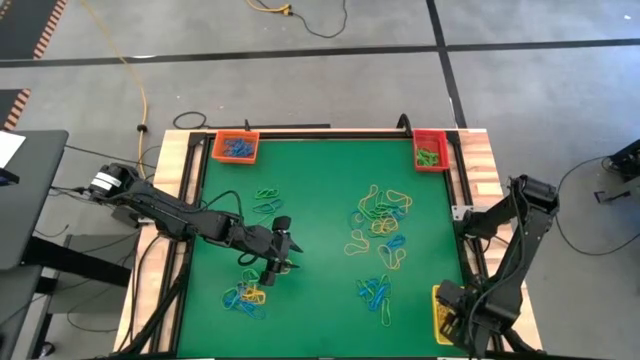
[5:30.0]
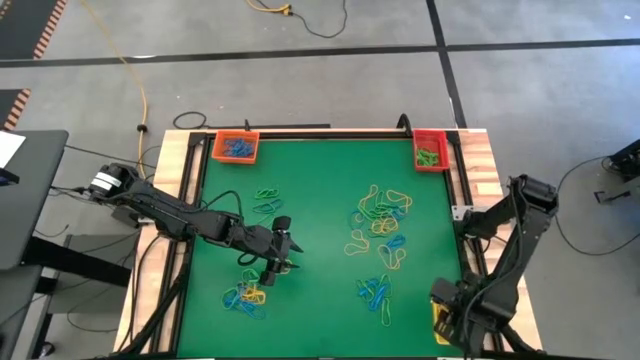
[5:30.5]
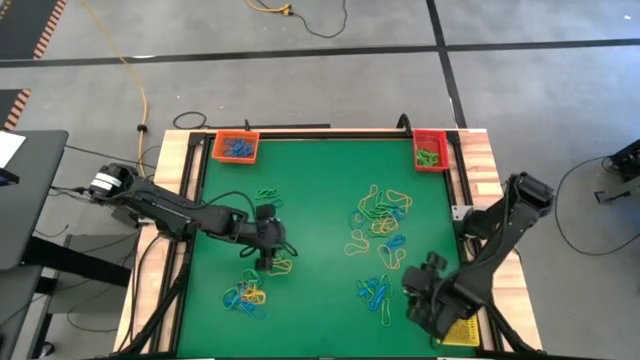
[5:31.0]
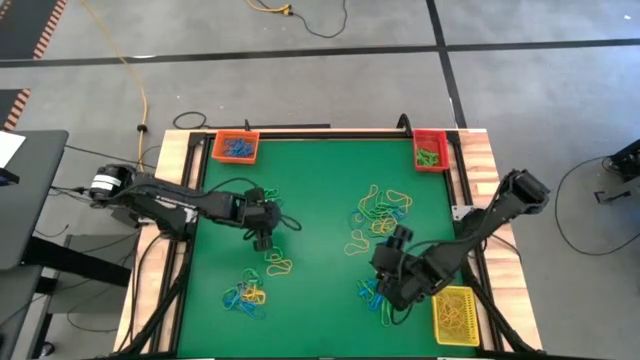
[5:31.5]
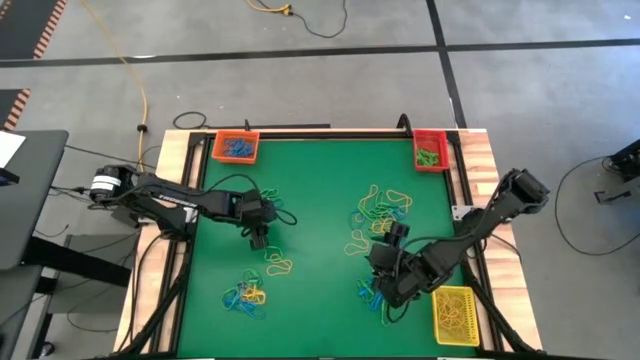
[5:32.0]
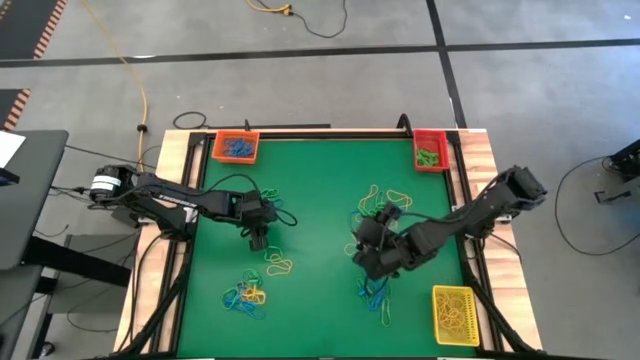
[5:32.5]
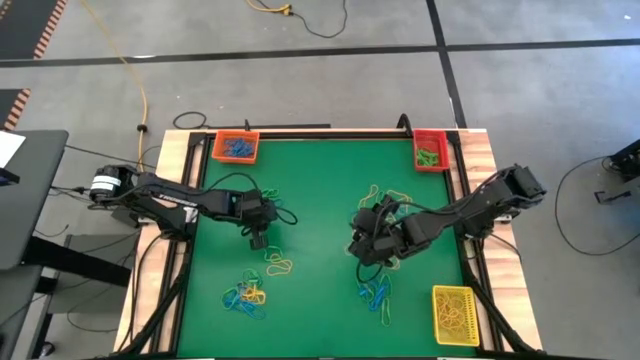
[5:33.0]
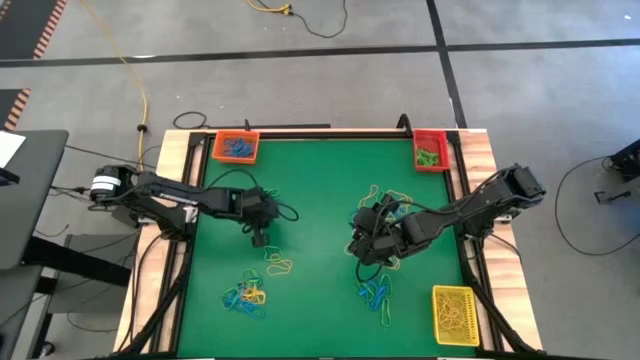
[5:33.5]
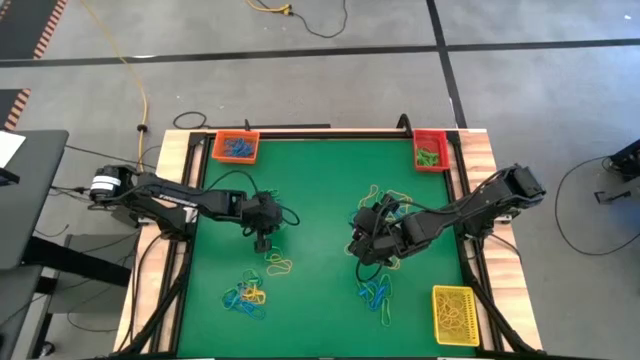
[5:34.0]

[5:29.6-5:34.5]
Task: Sort rubber bands into baskets
Put the top left green rubber band into the red bin

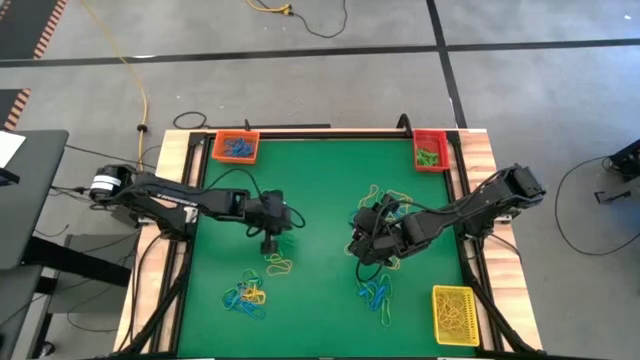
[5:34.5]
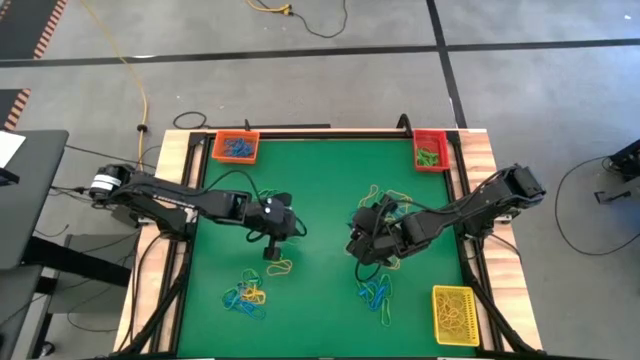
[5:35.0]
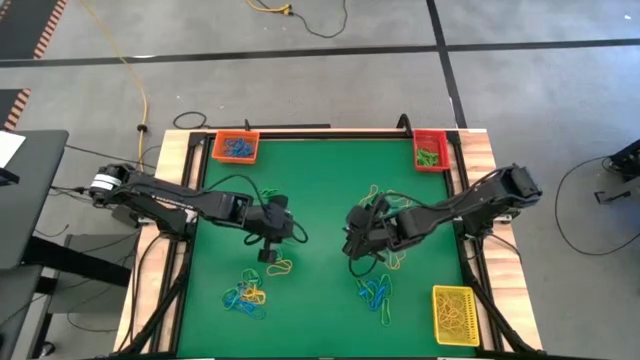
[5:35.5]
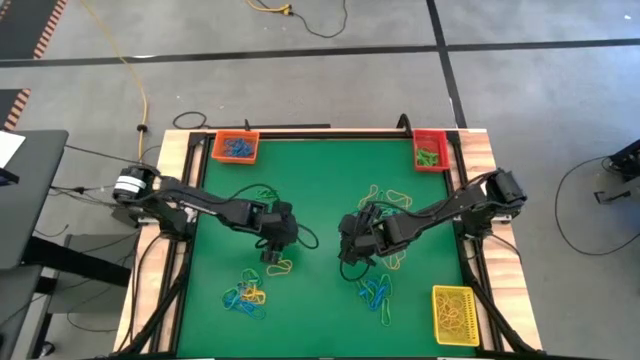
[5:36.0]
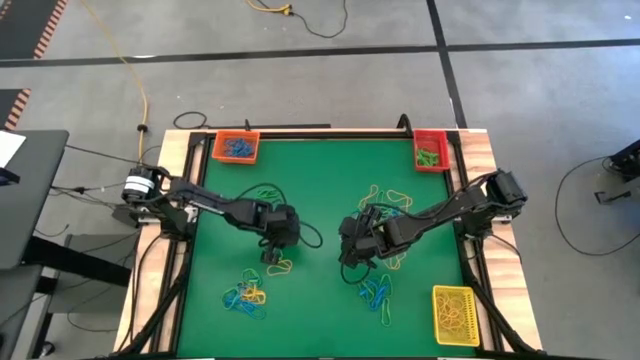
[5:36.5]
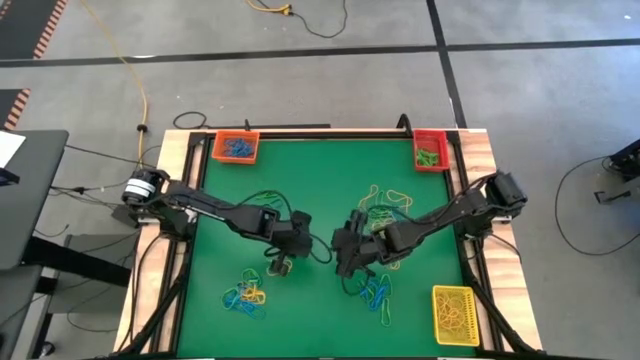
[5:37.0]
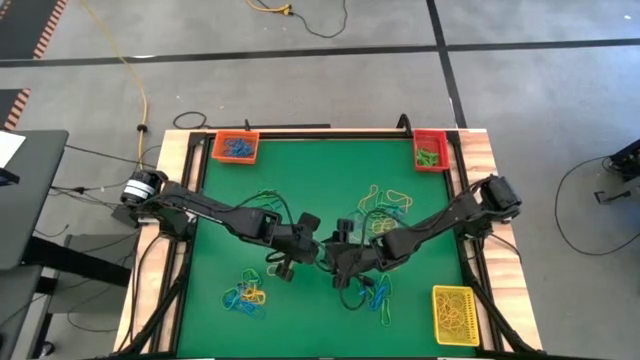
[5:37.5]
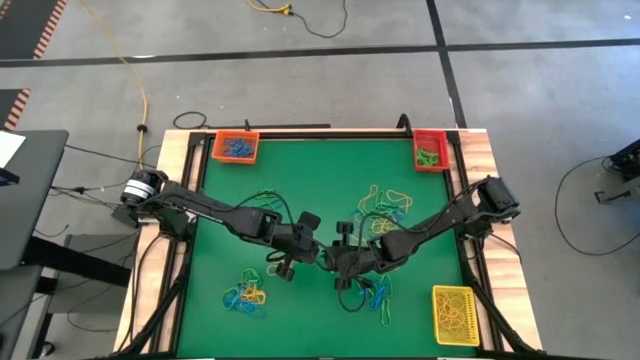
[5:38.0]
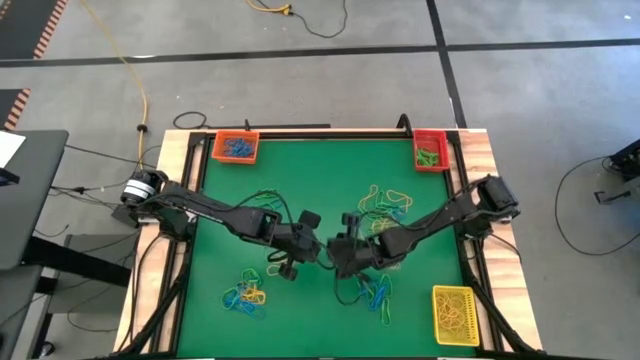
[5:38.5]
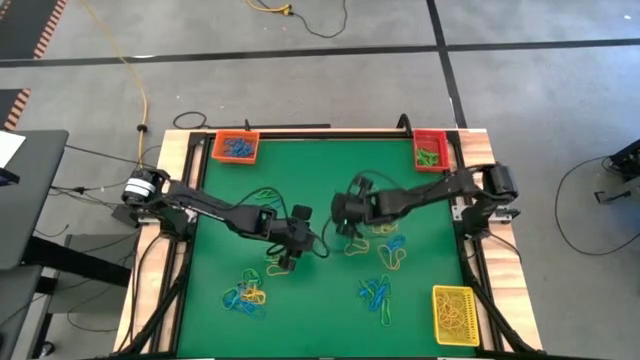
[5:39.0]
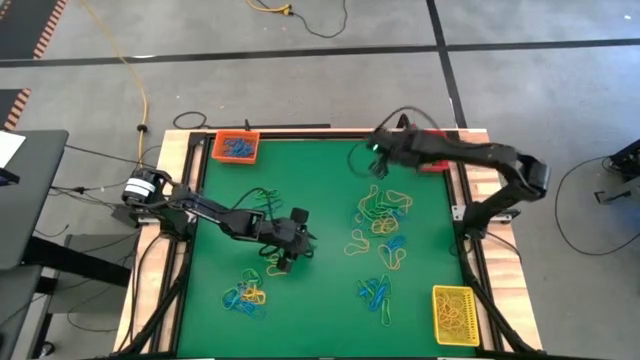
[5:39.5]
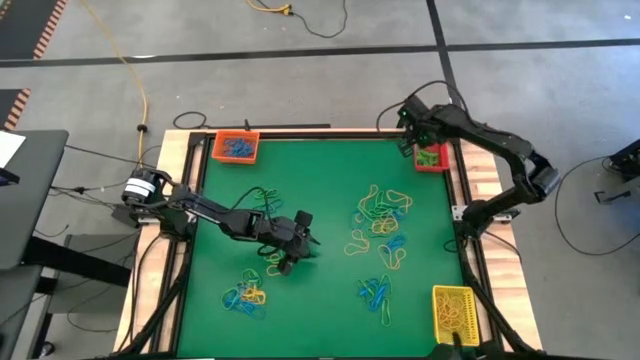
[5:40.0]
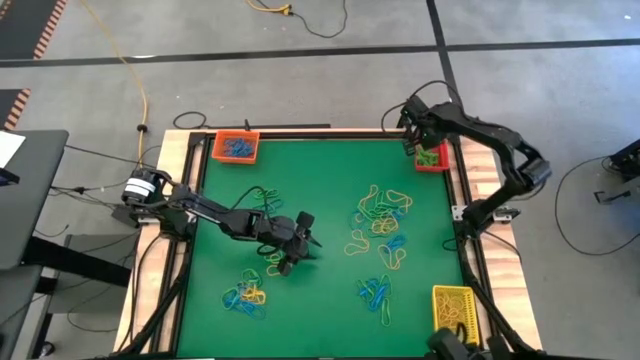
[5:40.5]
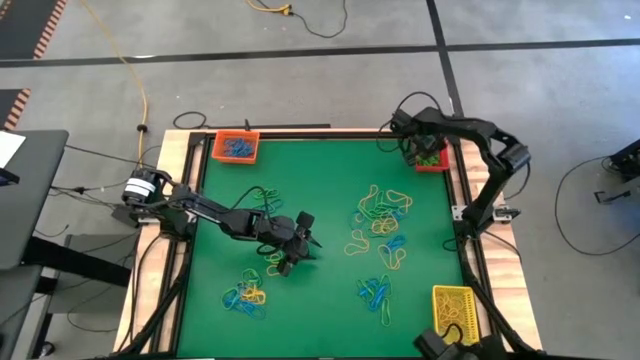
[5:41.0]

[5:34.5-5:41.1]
Put the top left green rubber band into the red bin

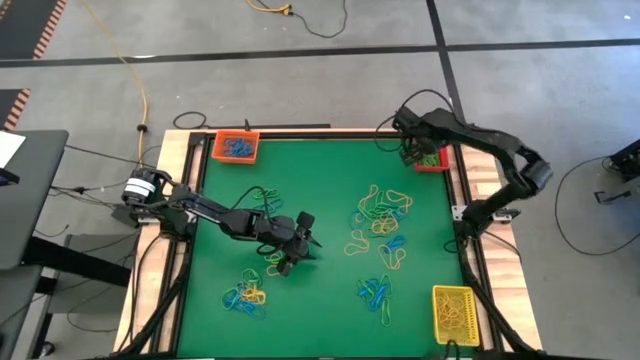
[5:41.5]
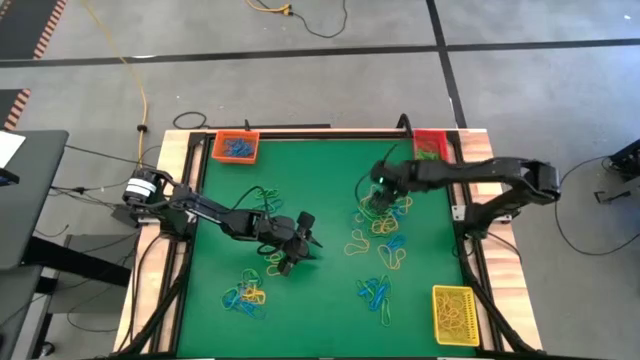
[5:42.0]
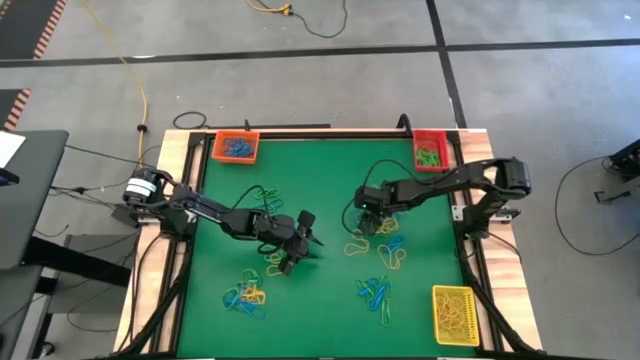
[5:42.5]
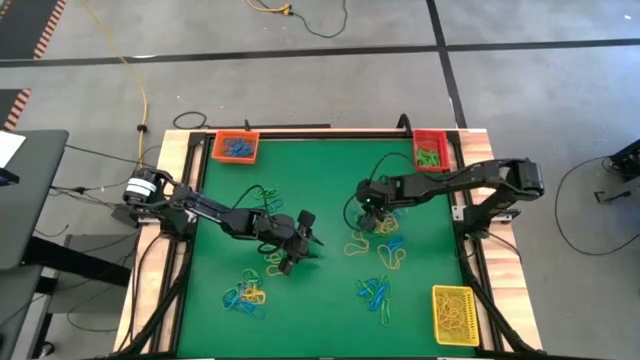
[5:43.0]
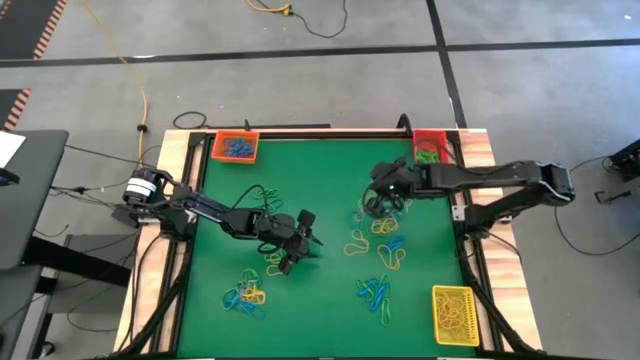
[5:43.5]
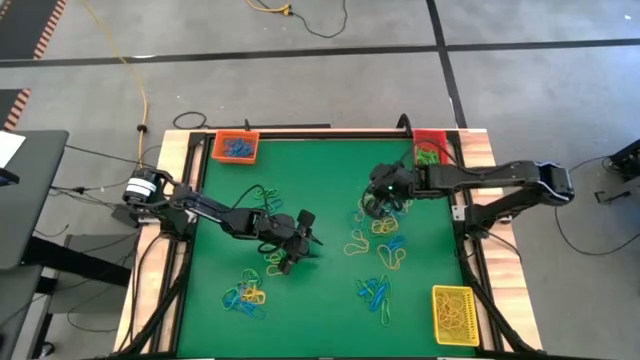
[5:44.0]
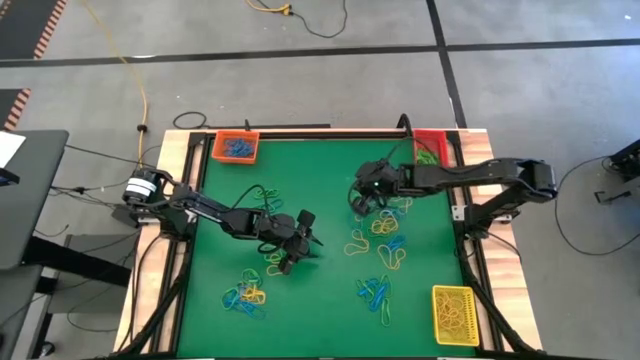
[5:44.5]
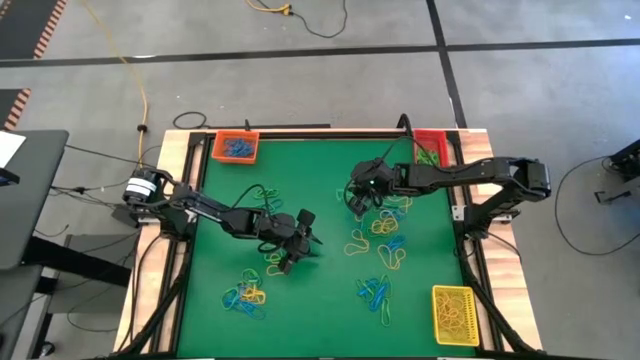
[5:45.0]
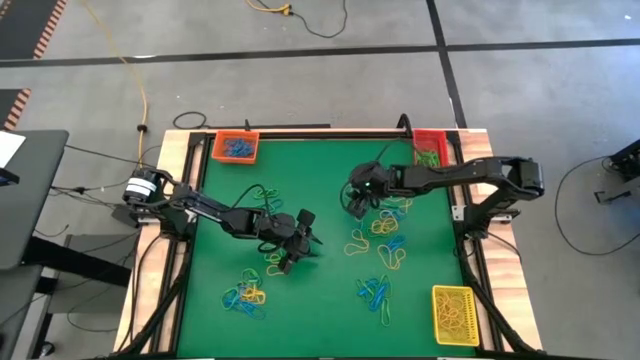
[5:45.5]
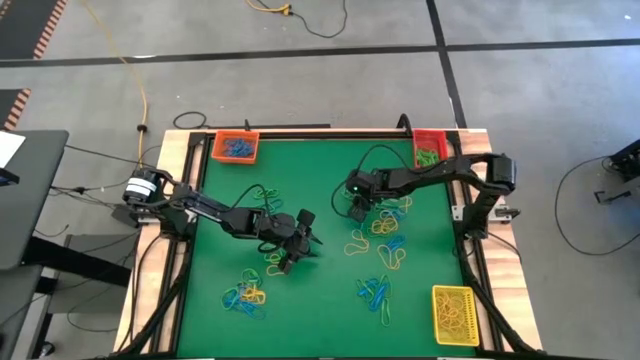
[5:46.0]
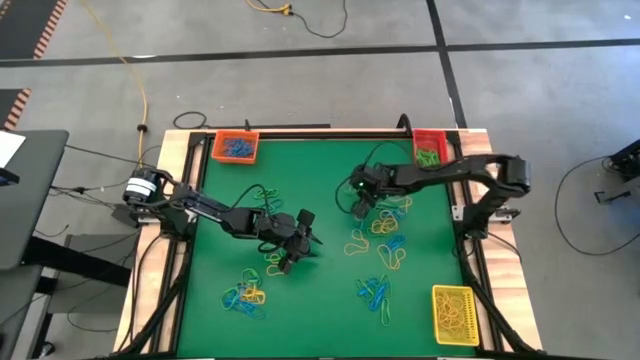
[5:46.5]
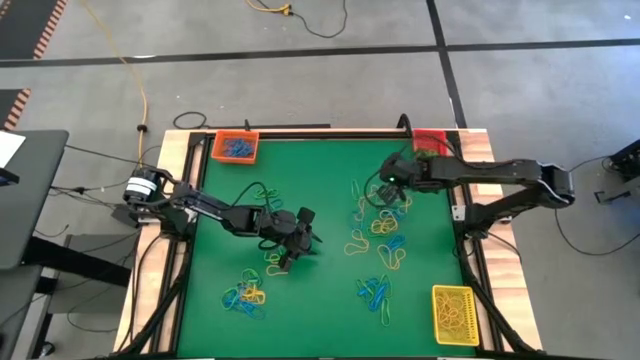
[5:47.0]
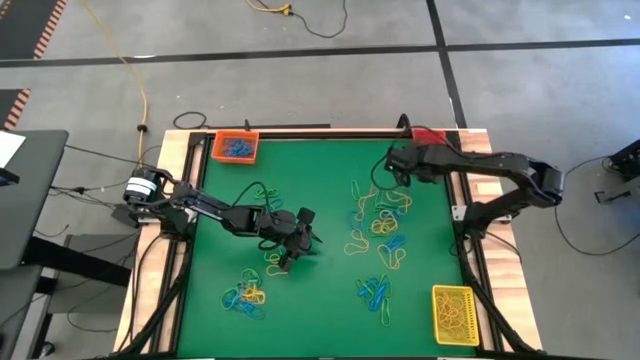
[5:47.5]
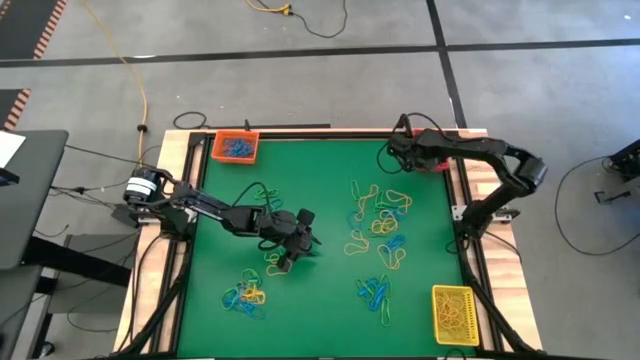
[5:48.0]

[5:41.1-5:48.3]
Put the top right green rubber band into the red bin

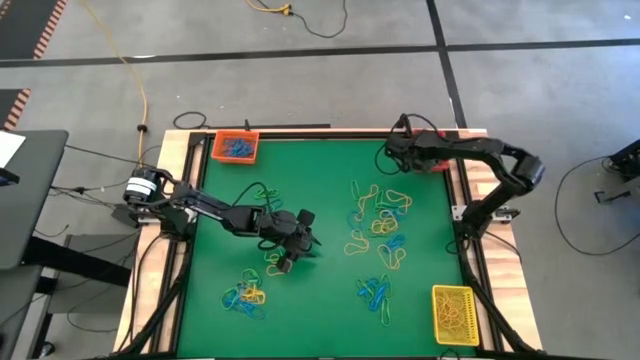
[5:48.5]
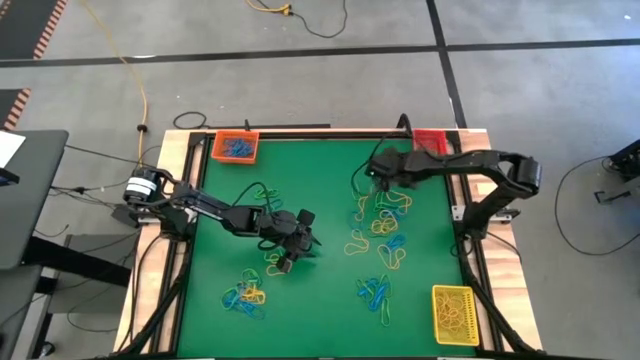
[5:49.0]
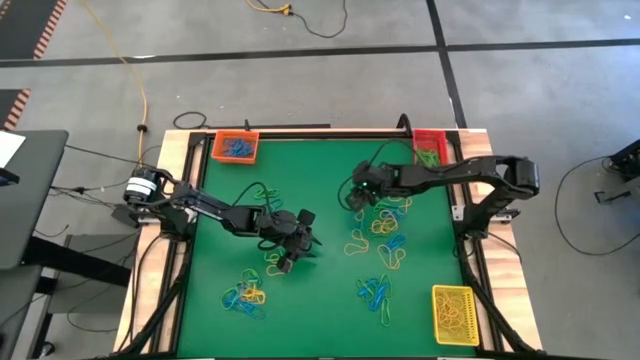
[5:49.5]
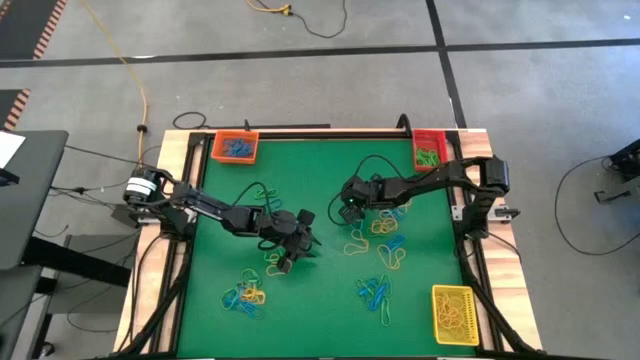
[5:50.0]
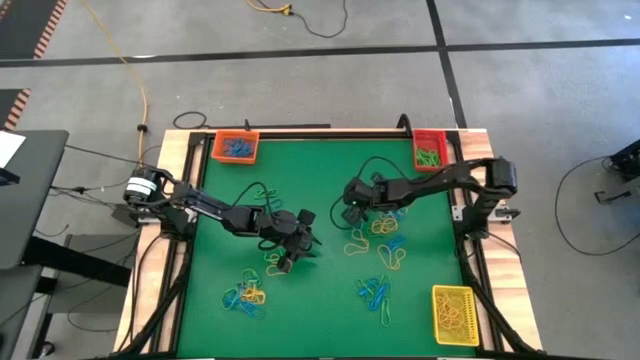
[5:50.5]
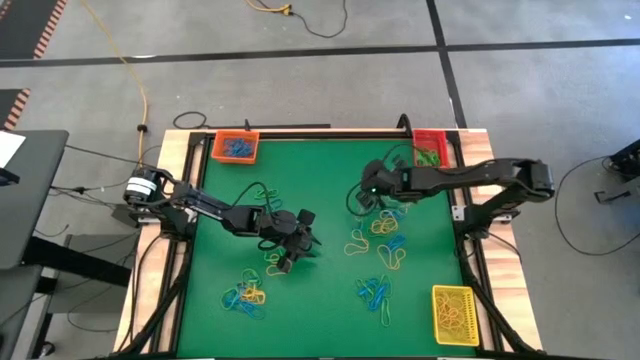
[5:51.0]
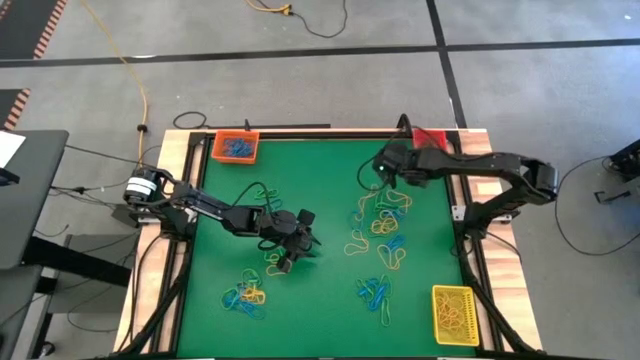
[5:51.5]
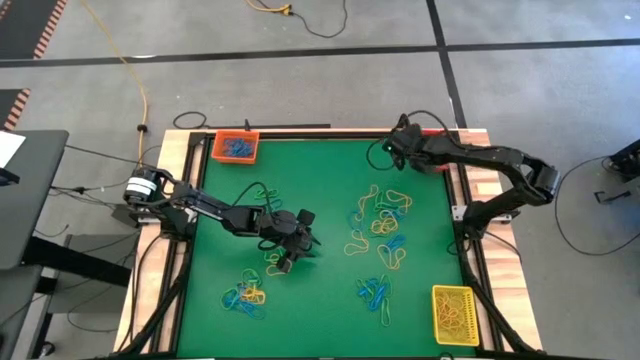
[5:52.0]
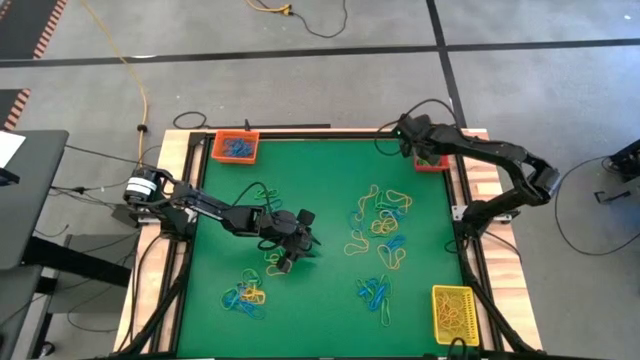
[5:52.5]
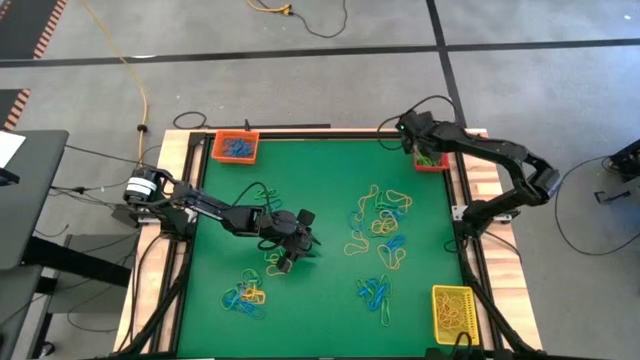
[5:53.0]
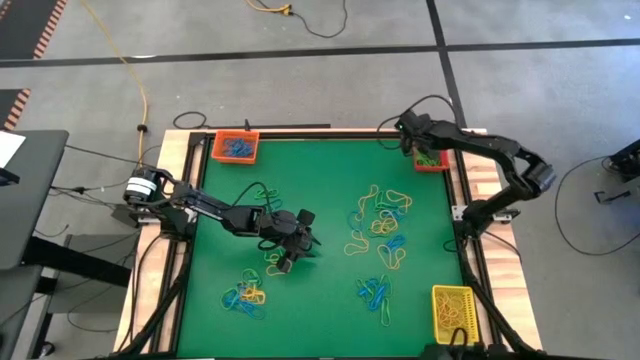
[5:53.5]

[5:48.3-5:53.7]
Put the top right green rubber band into the red bin
